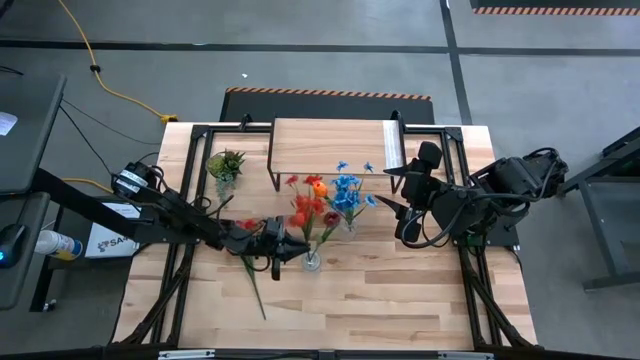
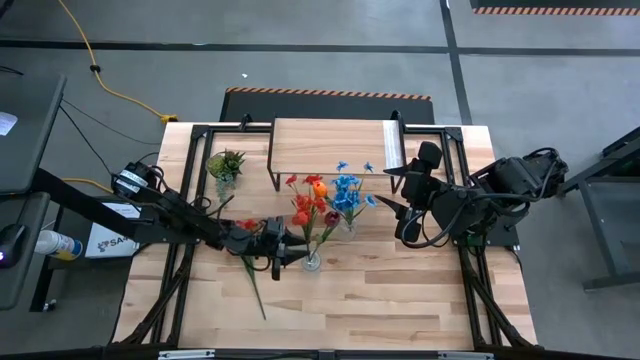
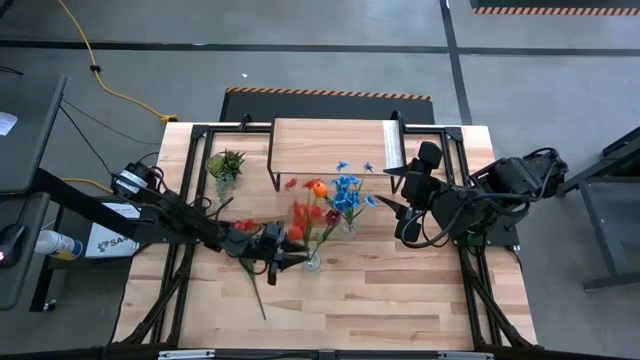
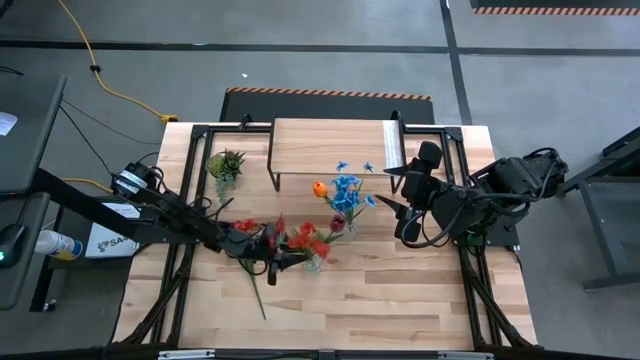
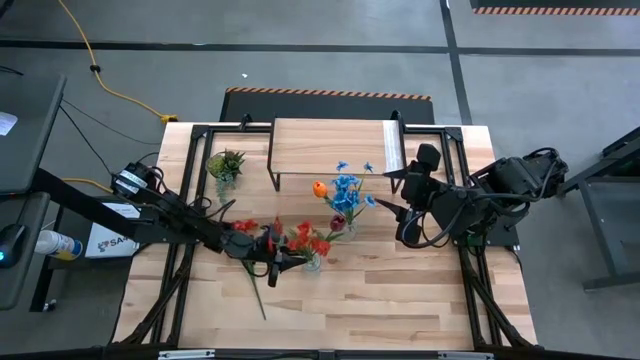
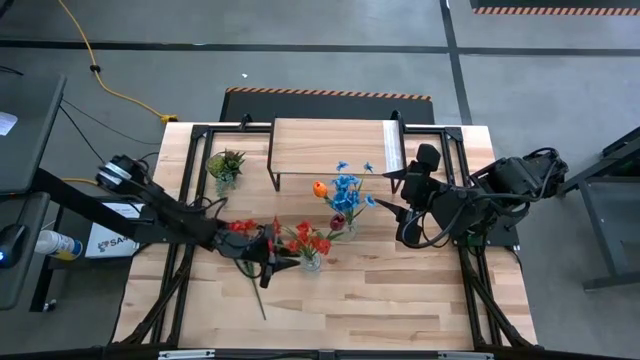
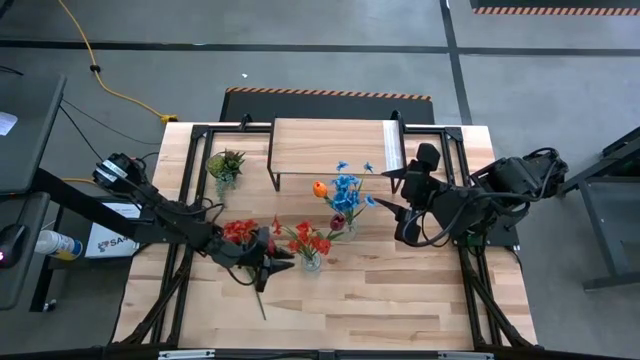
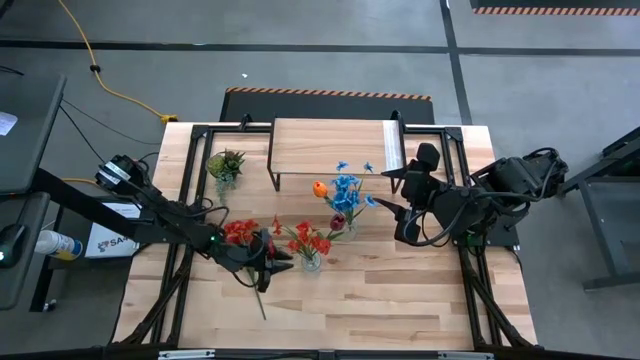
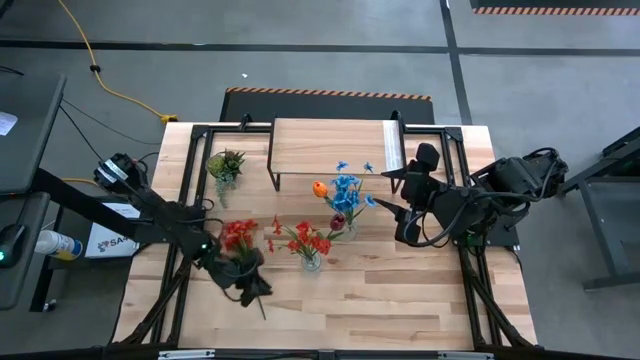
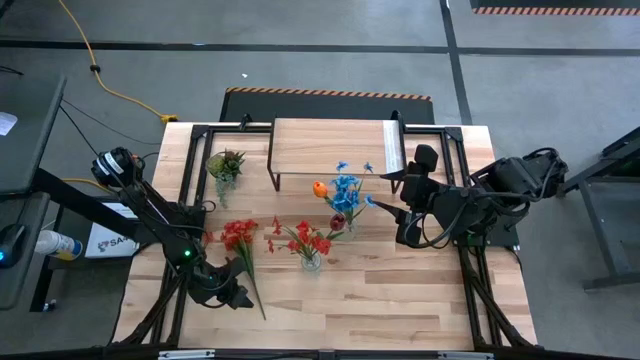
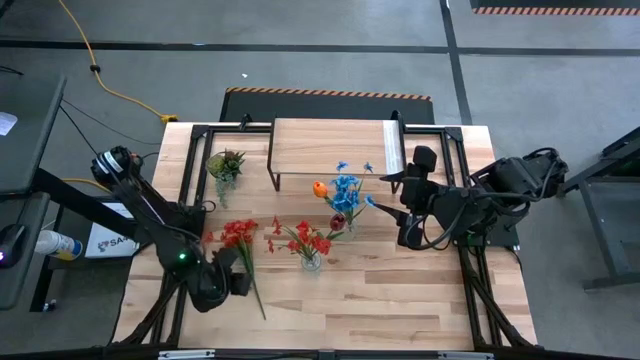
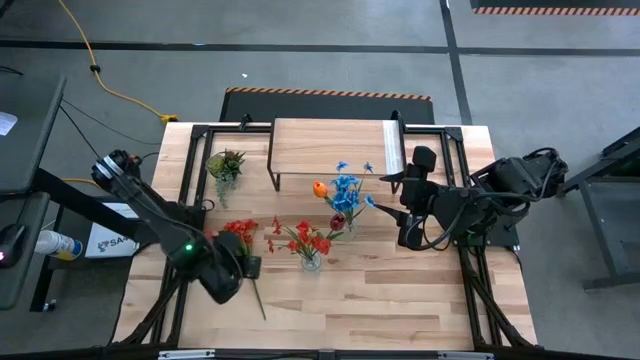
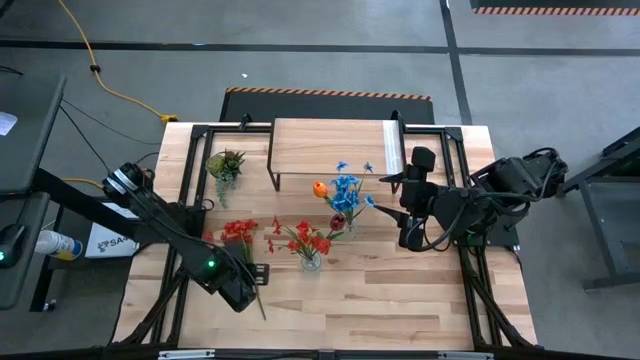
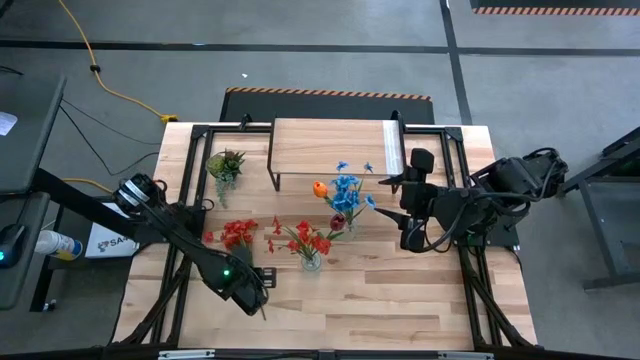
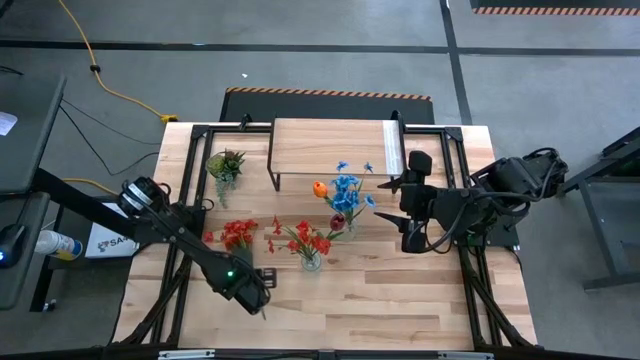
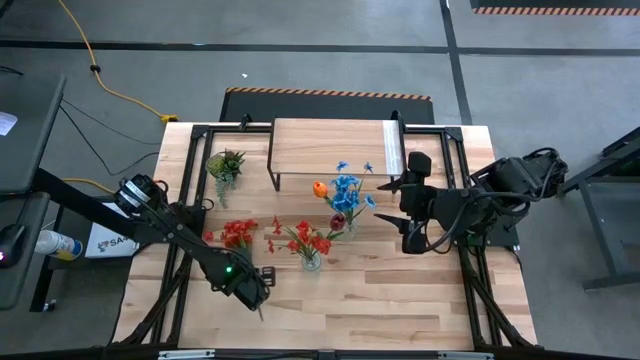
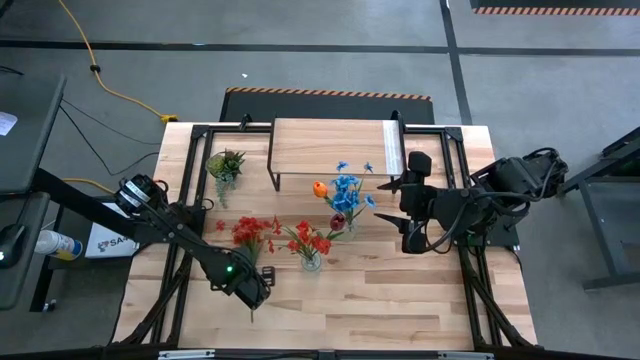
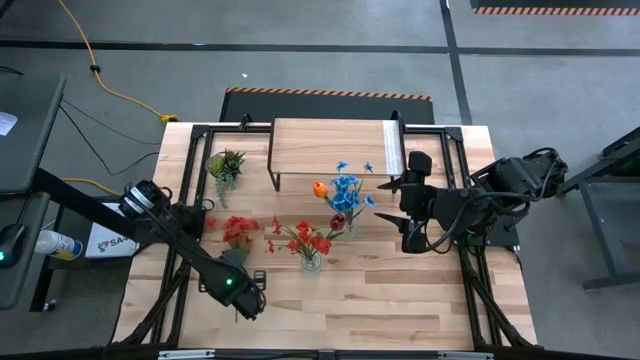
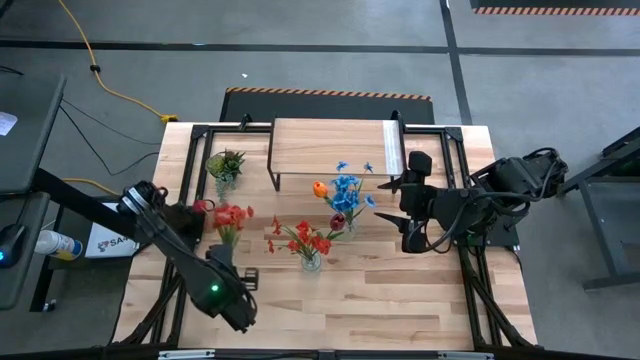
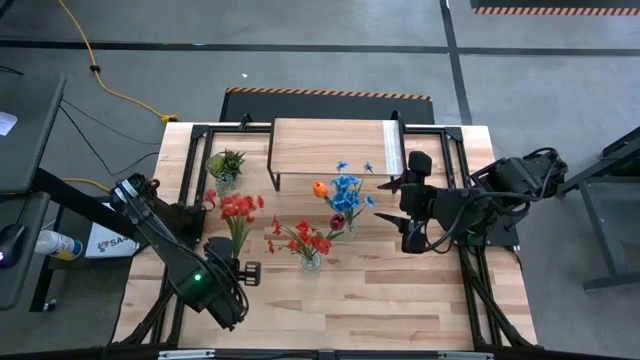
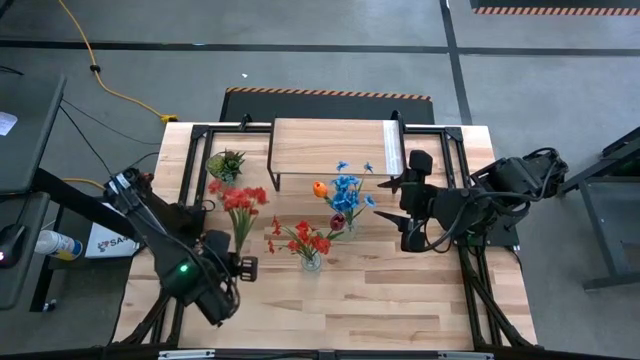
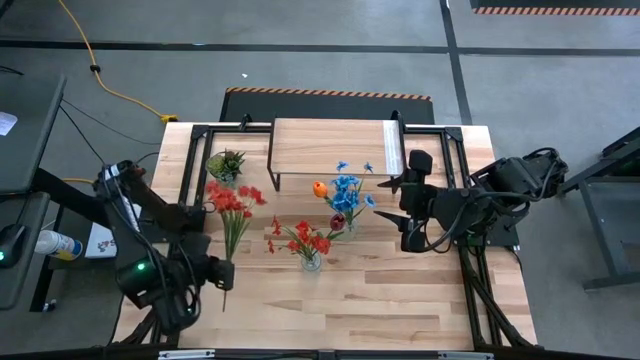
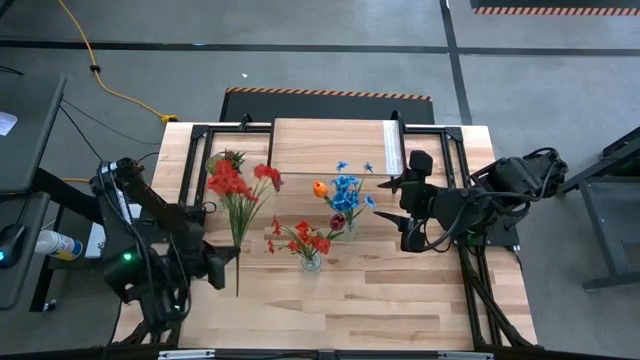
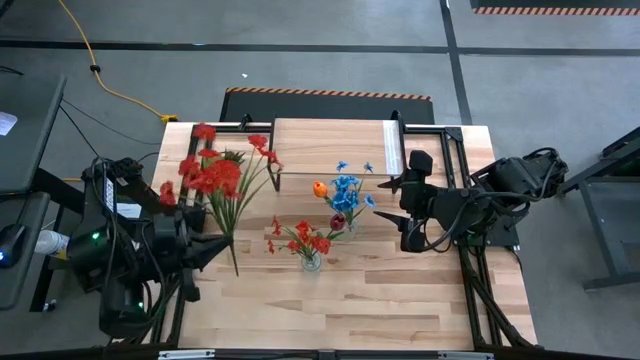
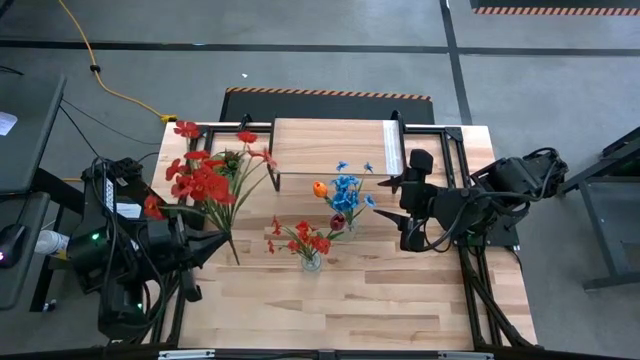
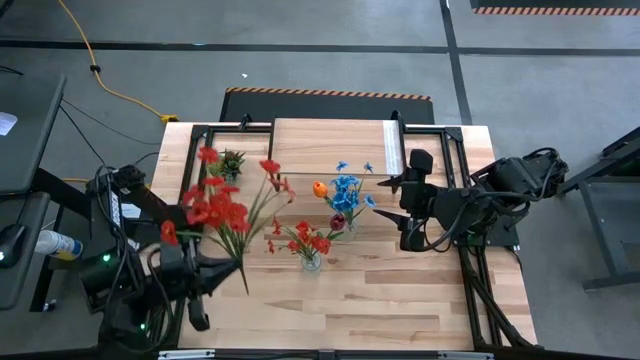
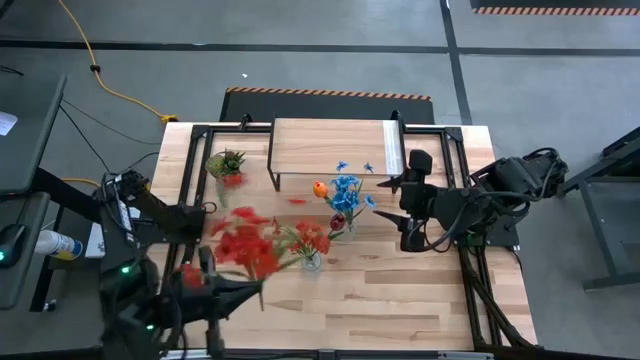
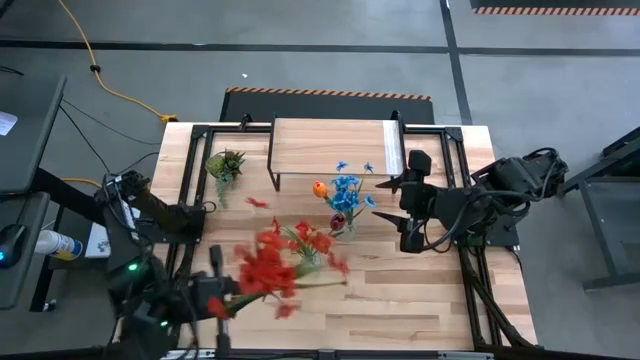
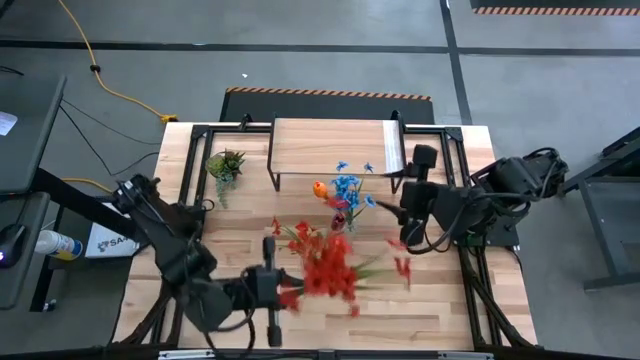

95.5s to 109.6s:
Task: Pick and place flowers into a vace then onto a shelf
Put the orange flowers into the bottom transparent vase

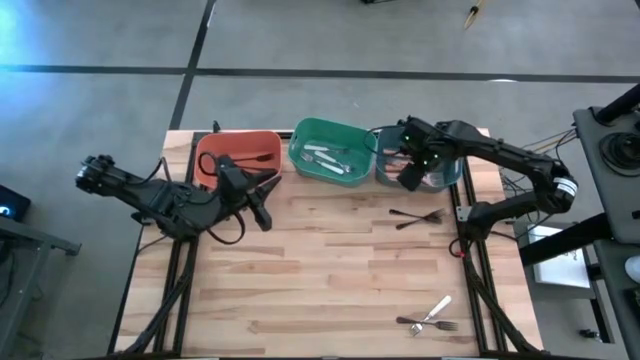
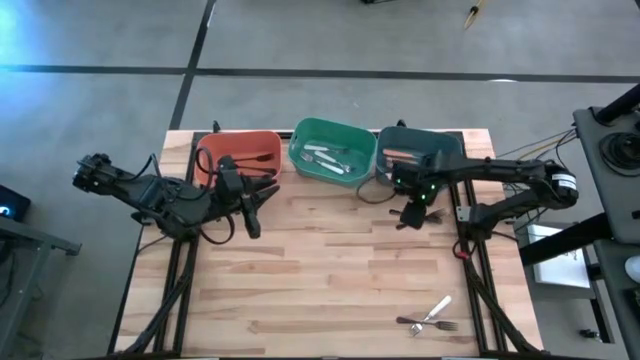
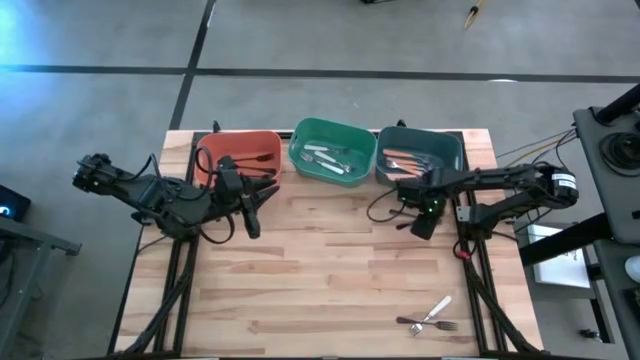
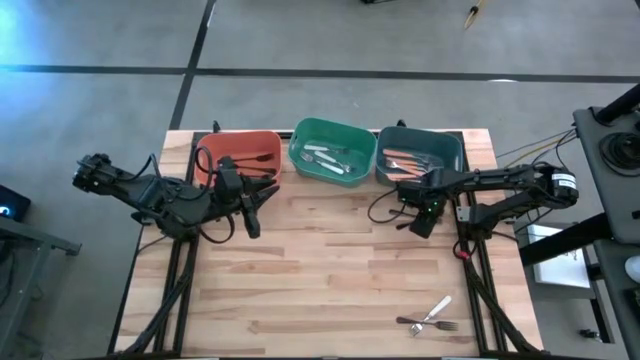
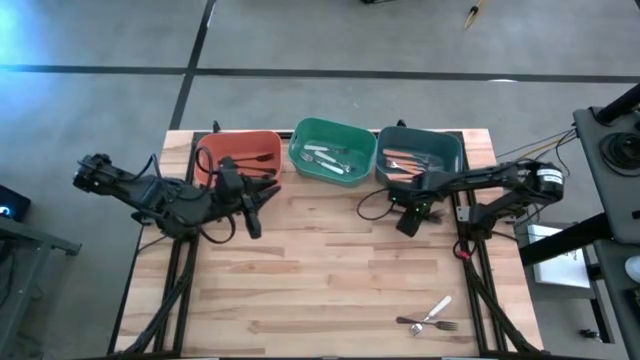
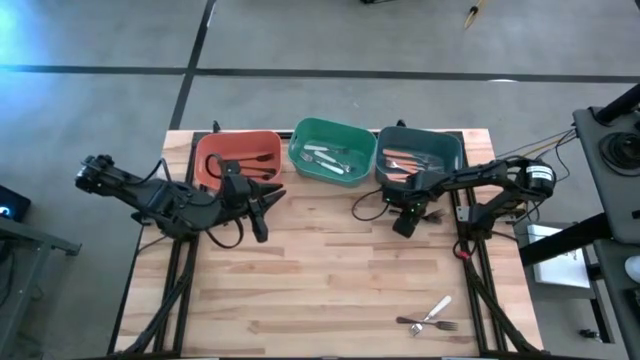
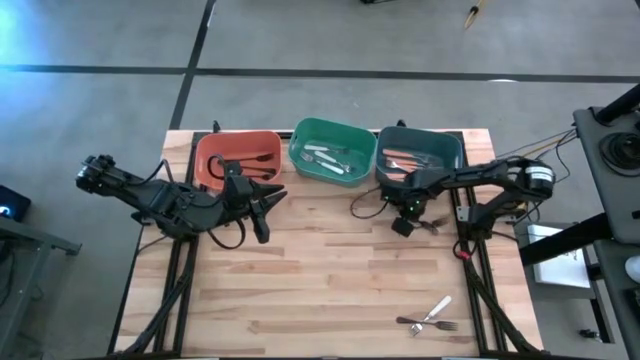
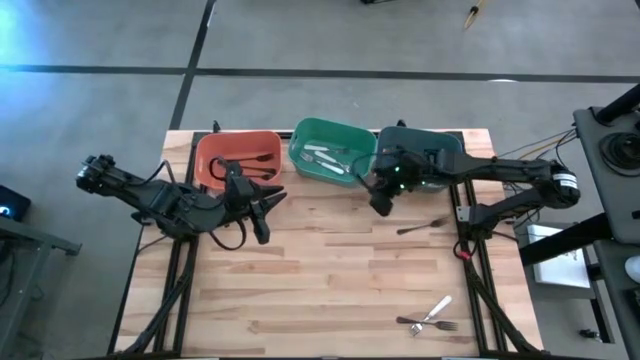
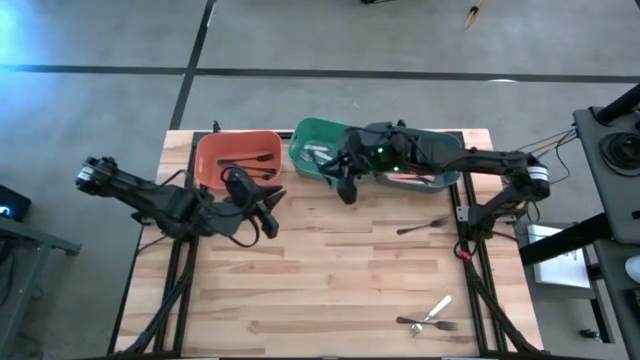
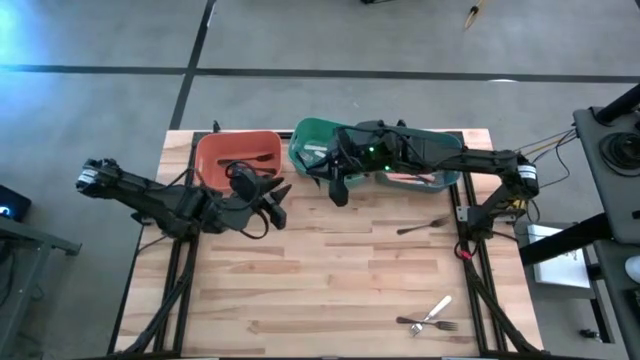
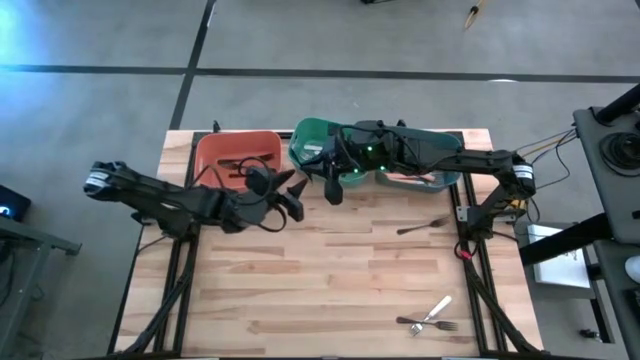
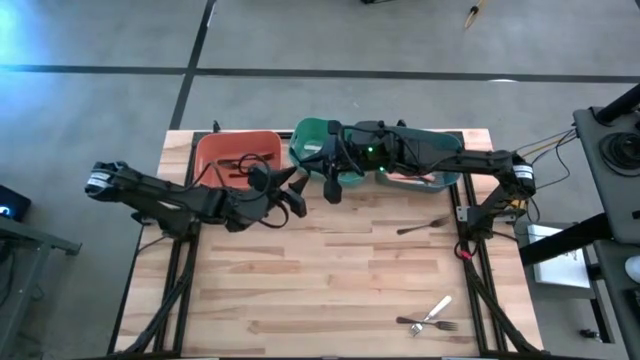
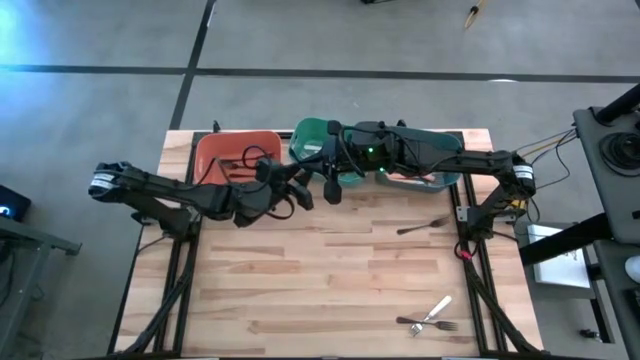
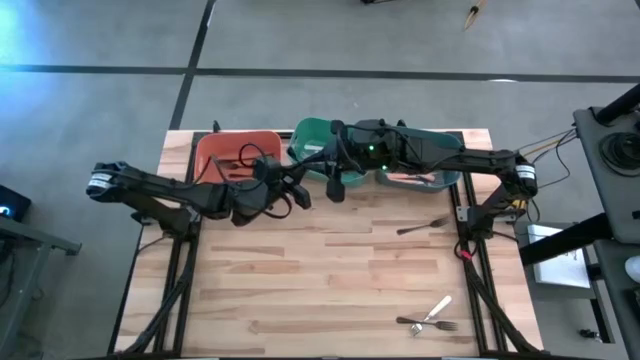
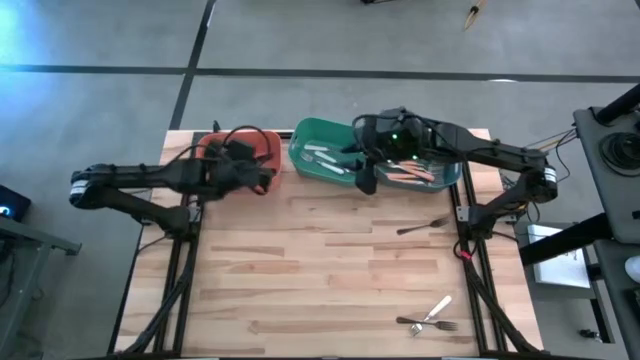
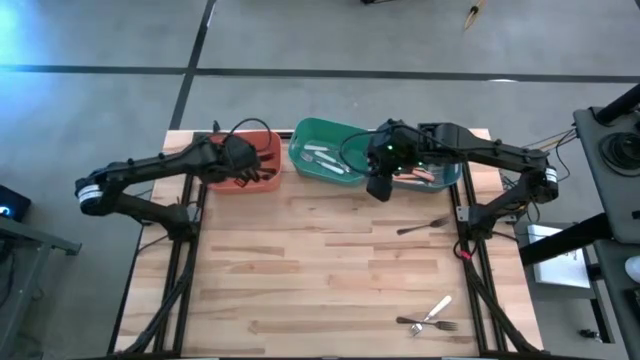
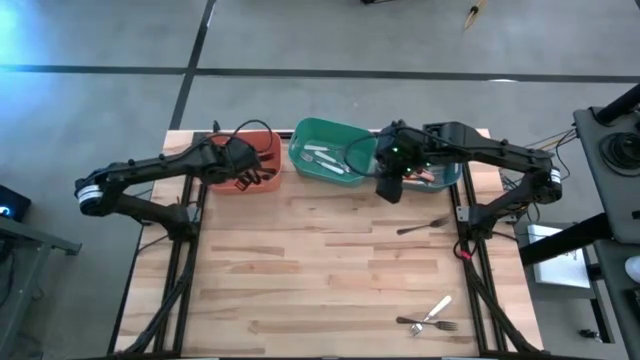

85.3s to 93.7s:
Task: Sort silverware by color (type)
Put the black fork into the orange bin
